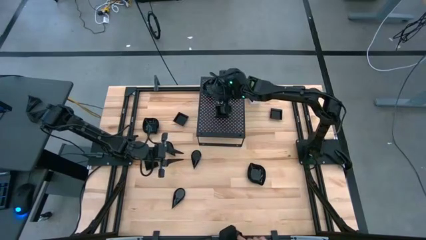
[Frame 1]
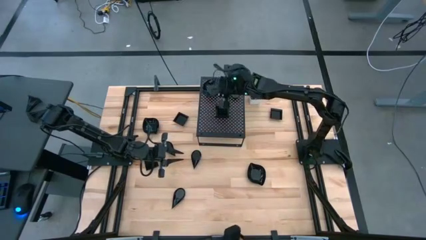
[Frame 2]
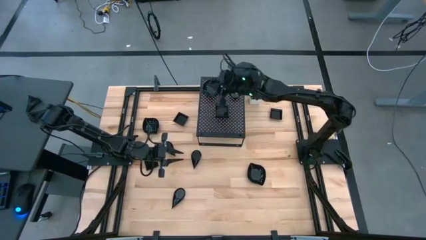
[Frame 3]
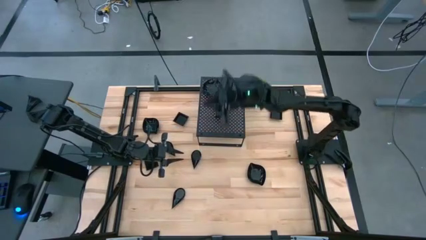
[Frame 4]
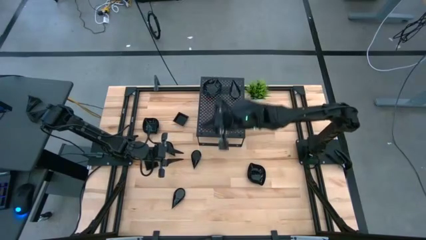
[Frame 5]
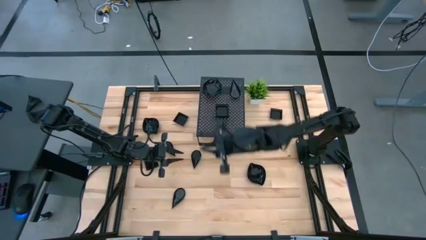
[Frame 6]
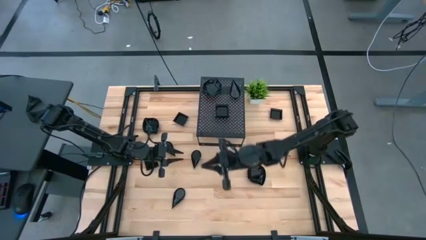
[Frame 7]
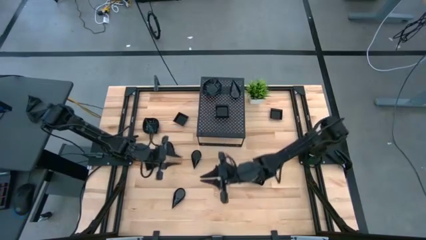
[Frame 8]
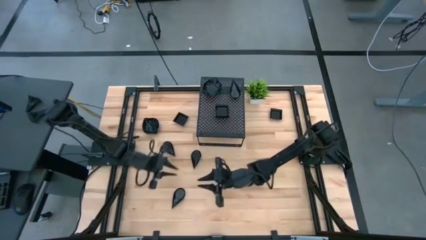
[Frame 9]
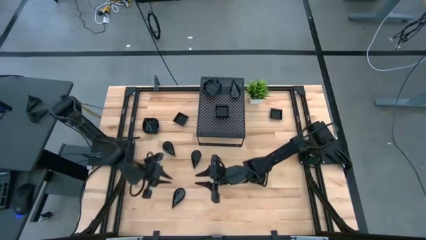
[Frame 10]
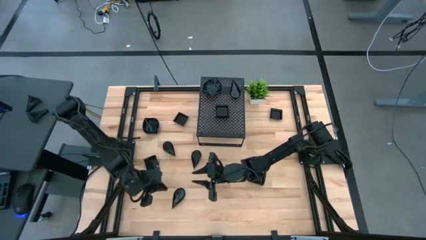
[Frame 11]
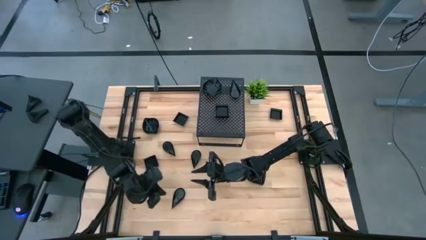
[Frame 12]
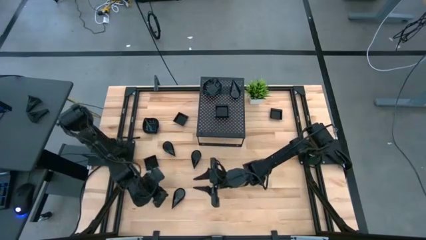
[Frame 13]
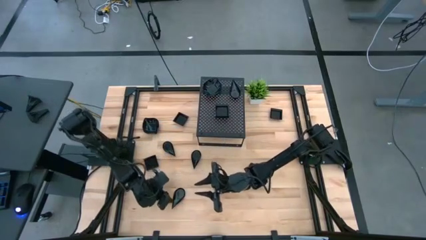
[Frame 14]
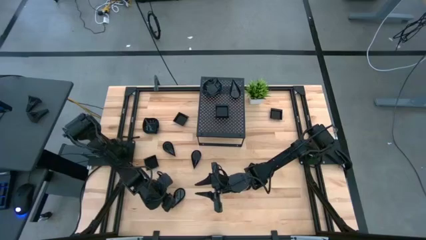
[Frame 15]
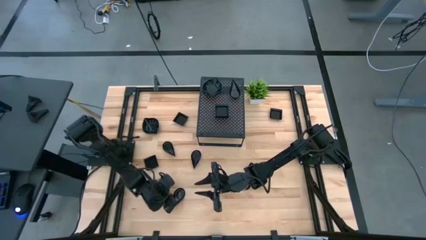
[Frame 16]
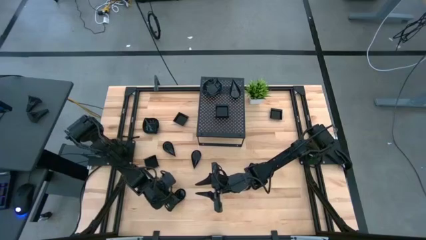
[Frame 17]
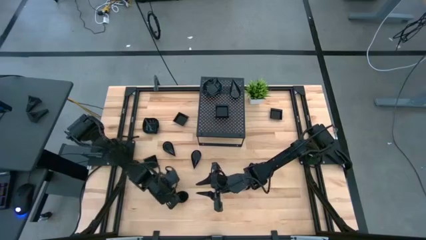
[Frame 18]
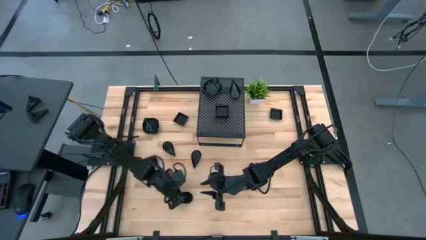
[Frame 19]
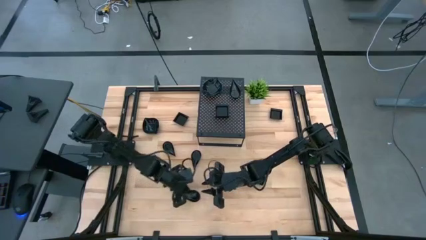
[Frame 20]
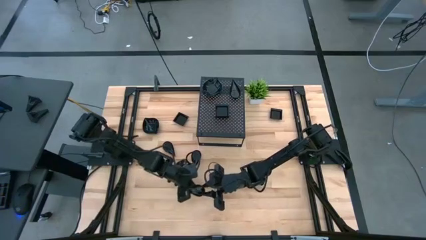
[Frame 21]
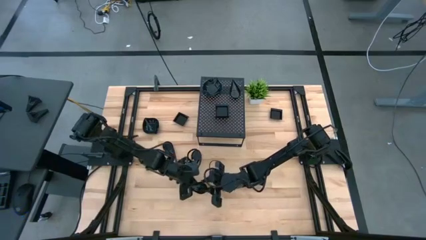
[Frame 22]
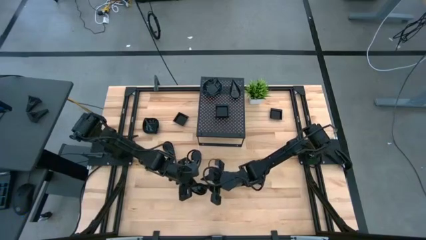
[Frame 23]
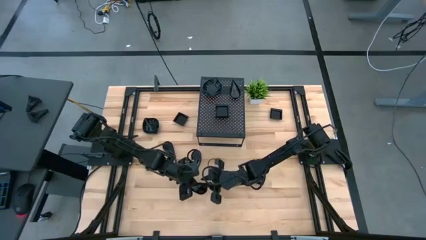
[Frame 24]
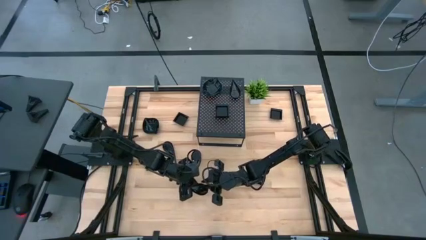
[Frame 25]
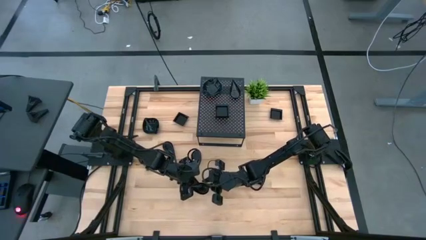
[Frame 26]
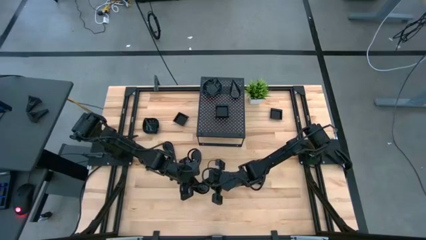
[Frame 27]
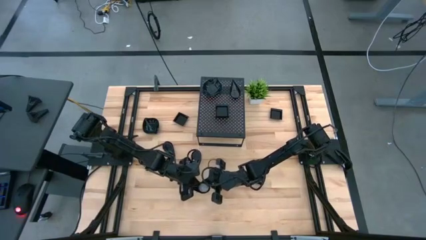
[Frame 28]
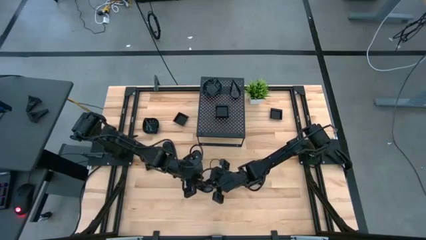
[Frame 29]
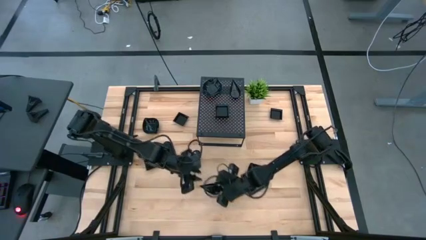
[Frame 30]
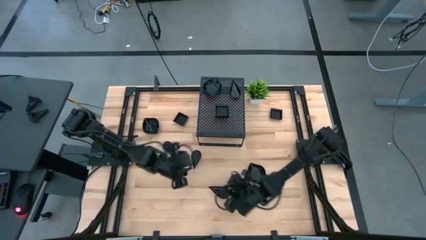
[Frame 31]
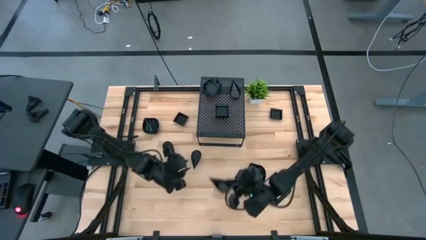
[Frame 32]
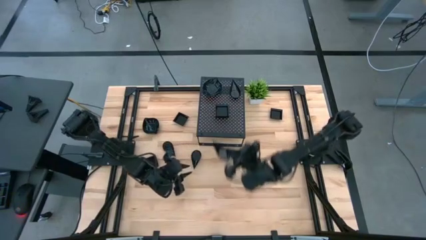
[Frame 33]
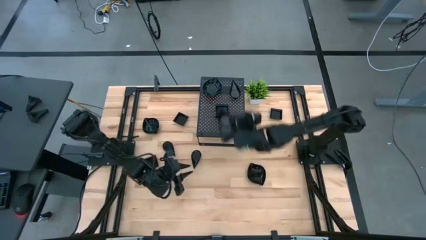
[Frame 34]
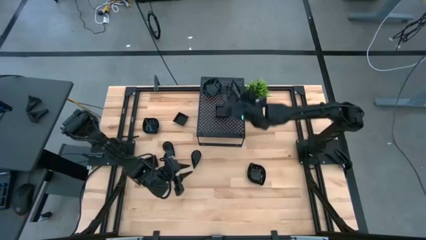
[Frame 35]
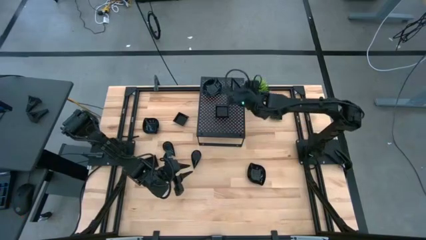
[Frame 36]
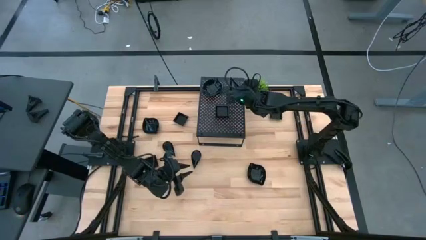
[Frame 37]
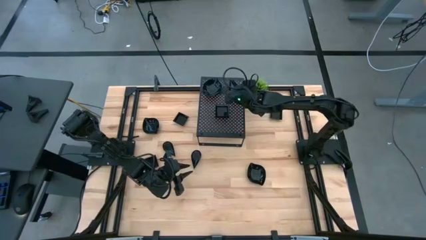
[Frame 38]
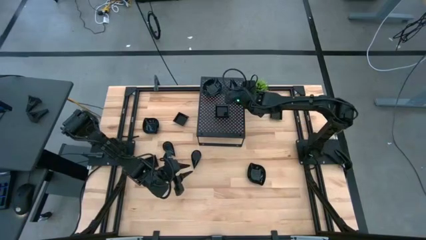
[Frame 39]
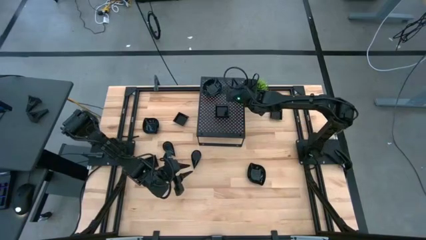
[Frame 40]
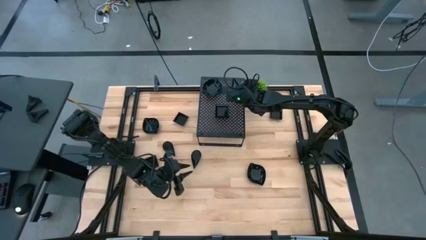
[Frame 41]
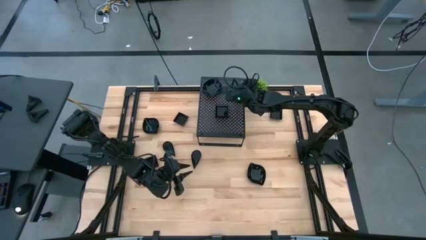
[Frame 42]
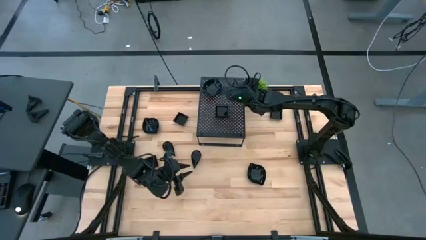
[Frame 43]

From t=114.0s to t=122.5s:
Task: Pick & Place Mini shaped plates
Stack the black drop-shaped plate on top of the black drop-shaped plates on the shelf

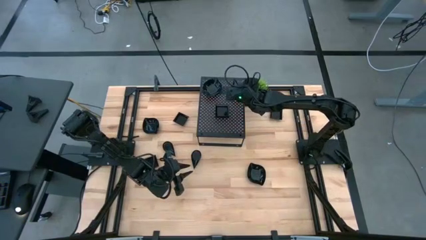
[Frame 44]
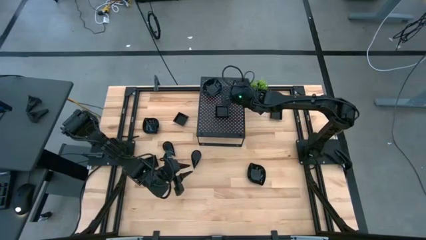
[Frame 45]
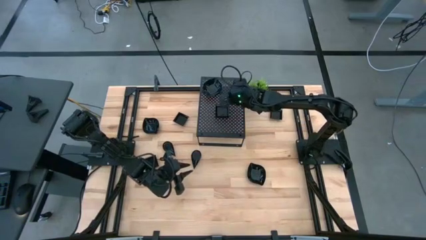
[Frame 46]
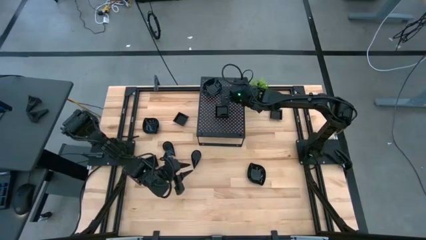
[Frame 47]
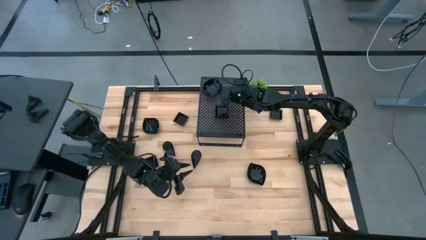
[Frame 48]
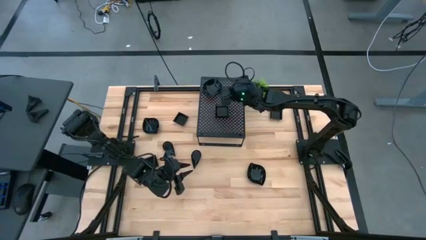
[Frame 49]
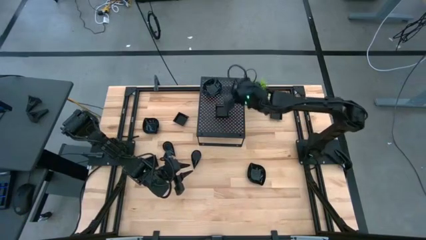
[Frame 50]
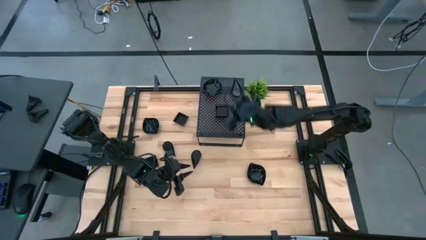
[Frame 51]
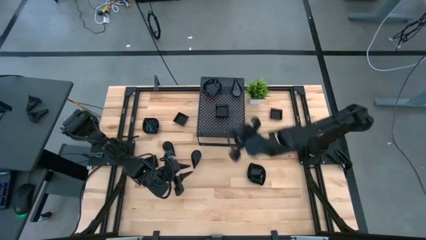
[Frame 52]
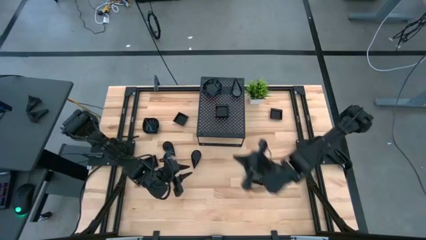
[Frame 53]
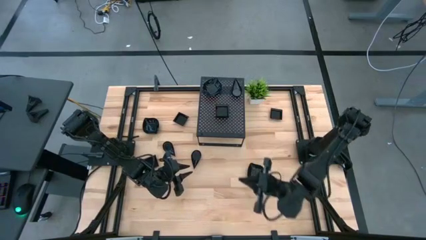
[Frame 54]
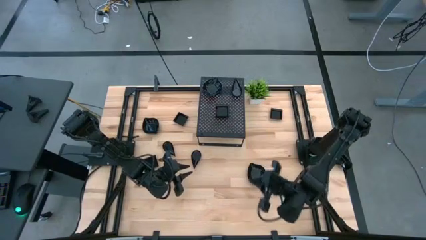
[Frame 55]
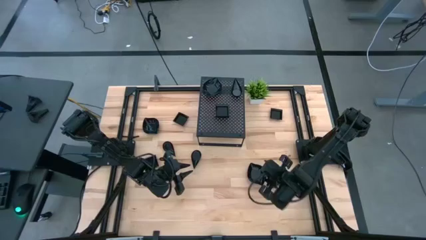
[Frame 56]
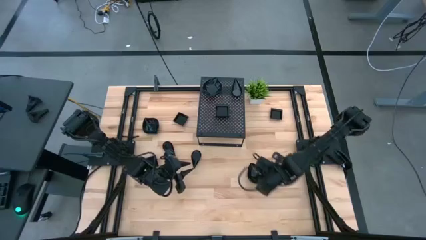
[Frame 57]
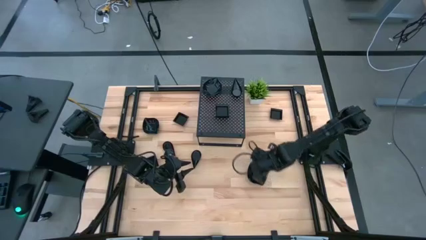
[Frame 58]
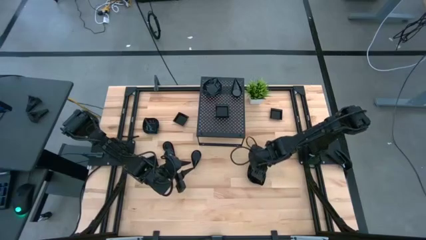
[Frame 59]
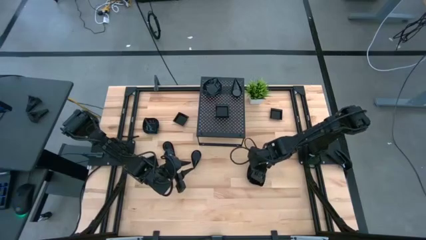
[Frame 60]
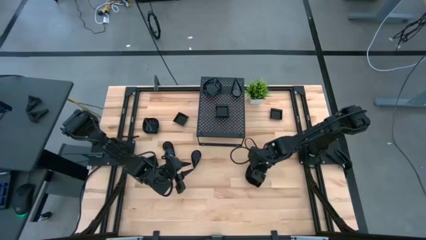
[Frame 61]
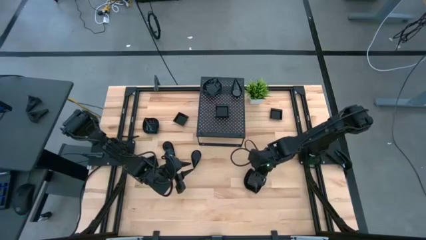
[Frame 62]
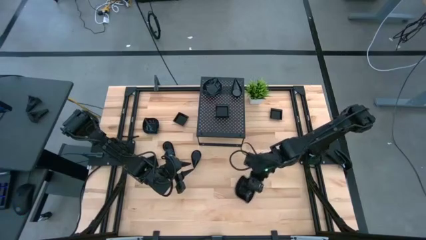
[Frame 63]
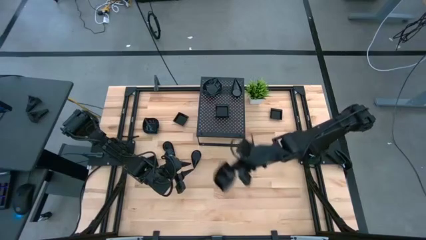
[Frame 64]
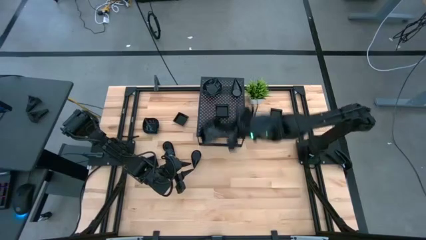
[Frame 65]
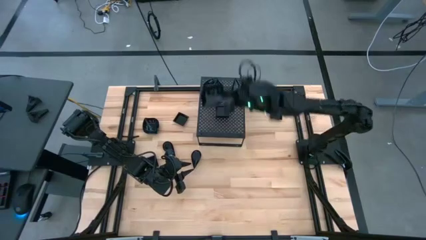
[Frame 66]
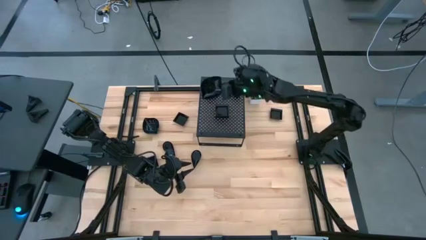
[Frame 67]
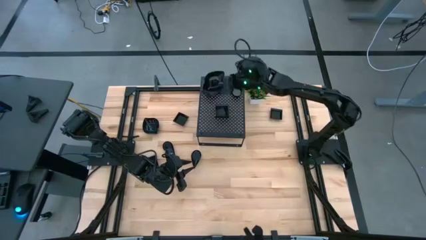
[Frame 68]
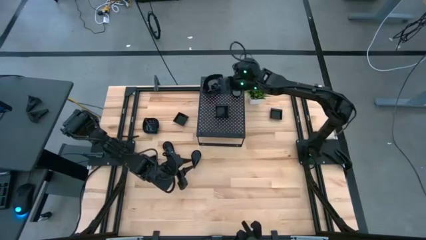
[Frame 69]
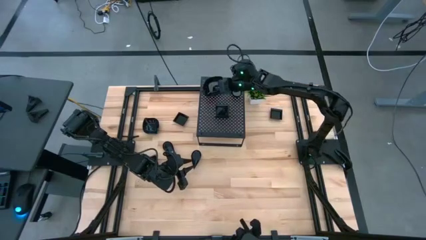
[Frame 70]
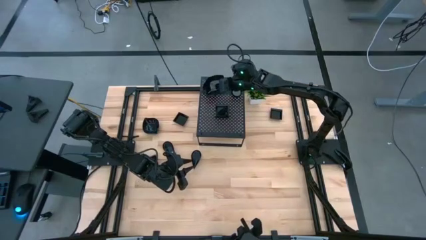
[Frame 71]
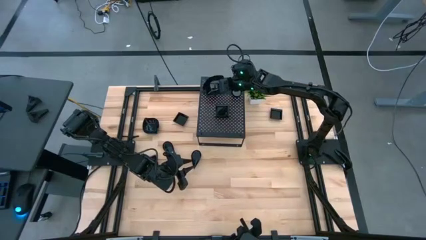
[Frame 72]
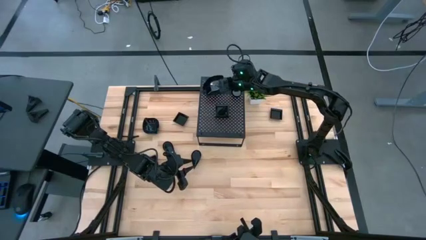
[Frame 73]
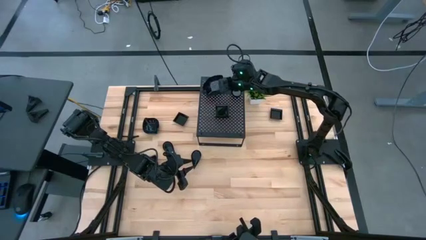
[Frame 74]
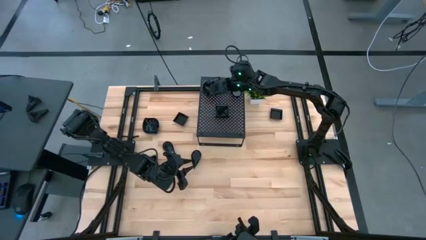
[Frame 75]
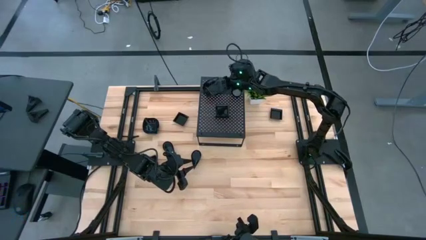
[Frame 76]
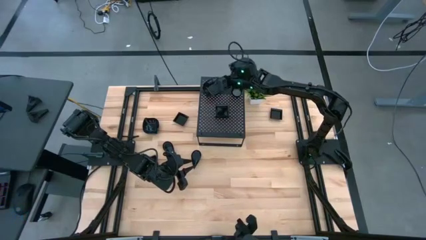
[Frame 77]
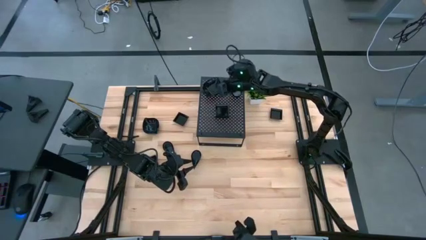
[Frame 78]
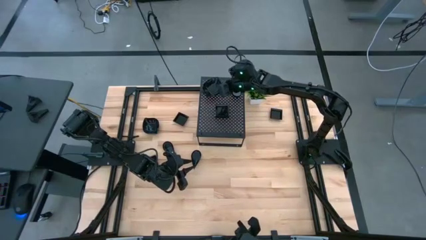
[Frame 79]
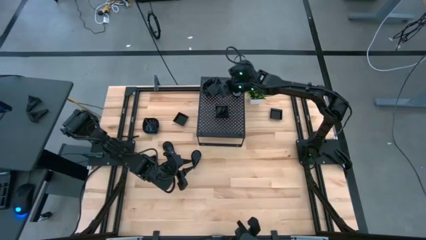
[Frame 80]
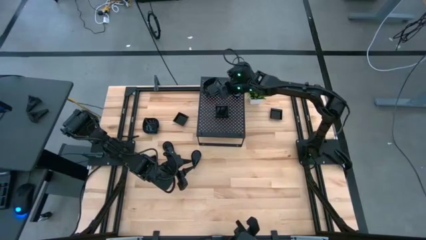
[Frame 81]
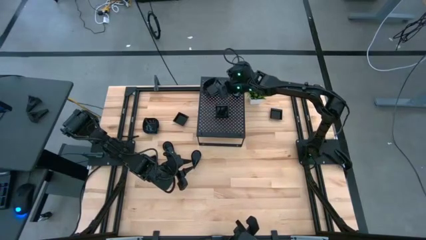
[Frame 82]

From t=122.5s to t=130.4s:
Stack the black leaf-shaped plate on top of the black leaf-shaped plates on the shelf
